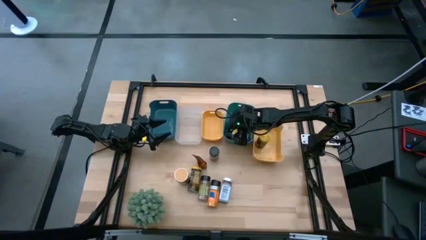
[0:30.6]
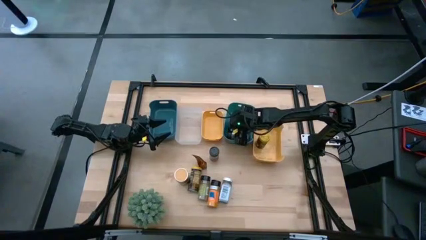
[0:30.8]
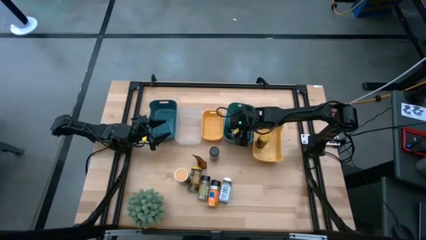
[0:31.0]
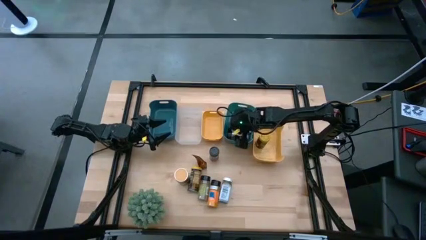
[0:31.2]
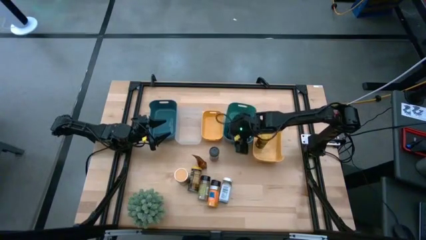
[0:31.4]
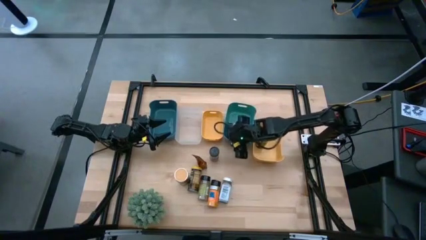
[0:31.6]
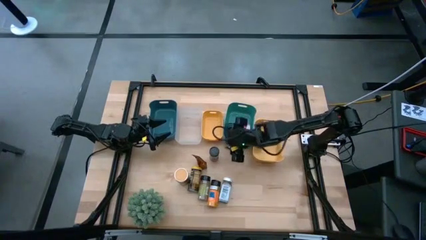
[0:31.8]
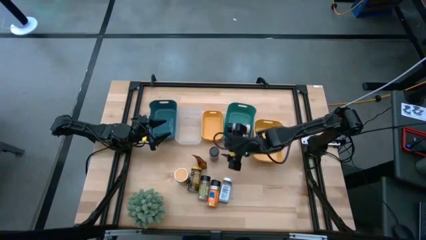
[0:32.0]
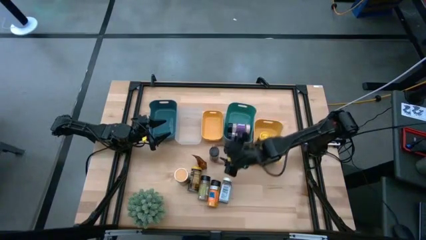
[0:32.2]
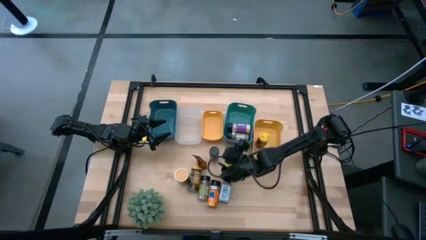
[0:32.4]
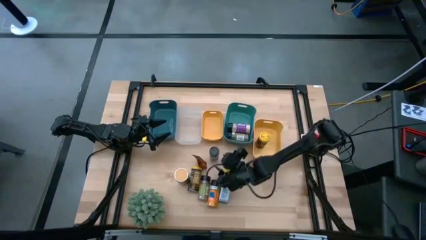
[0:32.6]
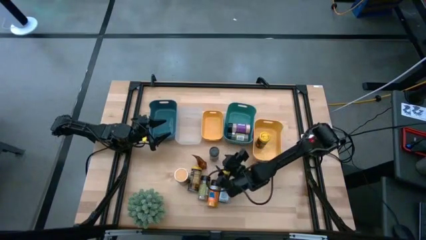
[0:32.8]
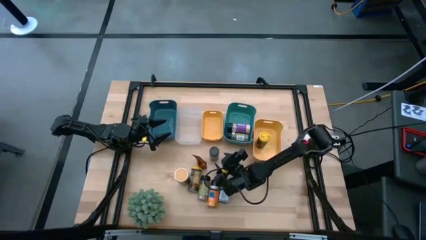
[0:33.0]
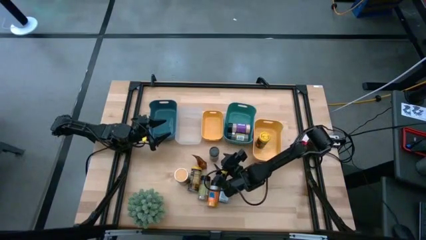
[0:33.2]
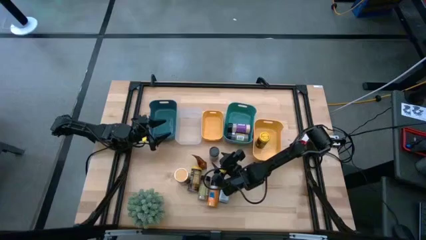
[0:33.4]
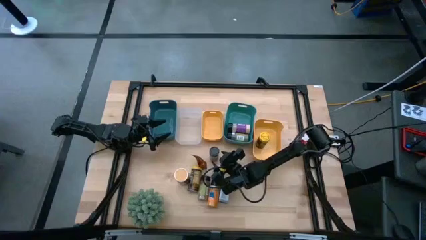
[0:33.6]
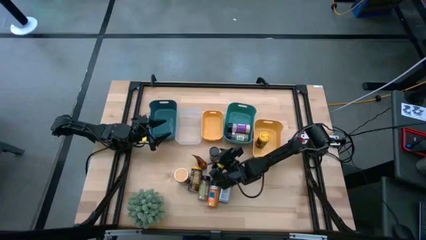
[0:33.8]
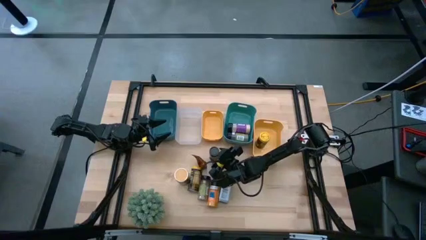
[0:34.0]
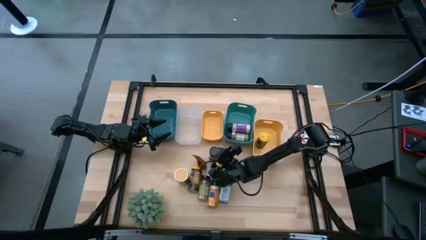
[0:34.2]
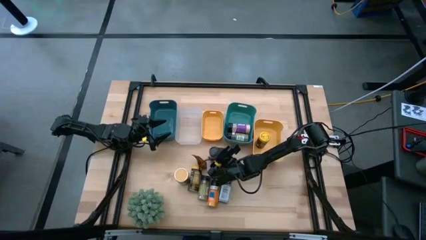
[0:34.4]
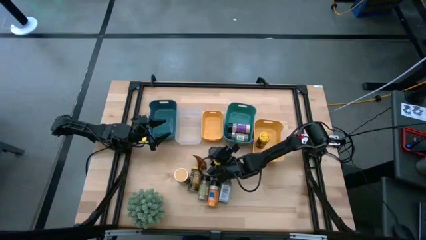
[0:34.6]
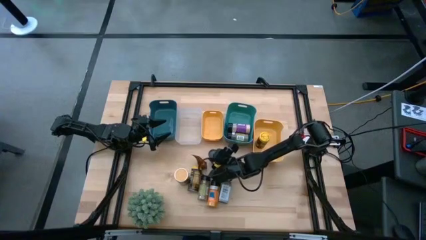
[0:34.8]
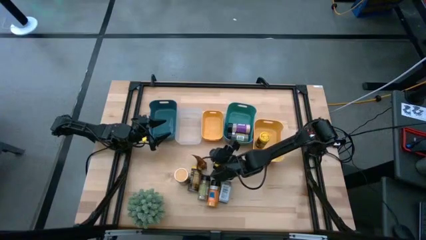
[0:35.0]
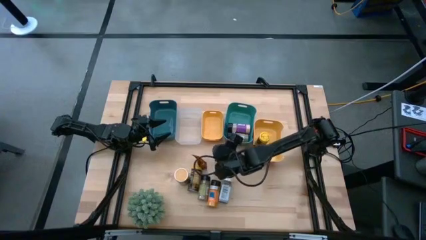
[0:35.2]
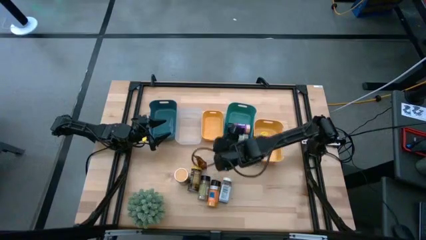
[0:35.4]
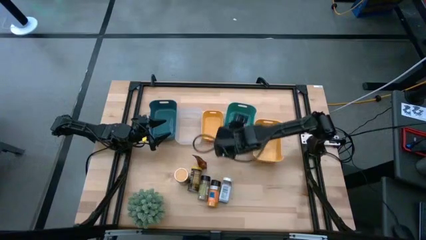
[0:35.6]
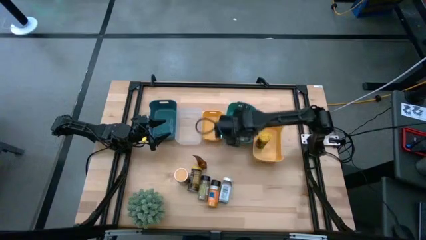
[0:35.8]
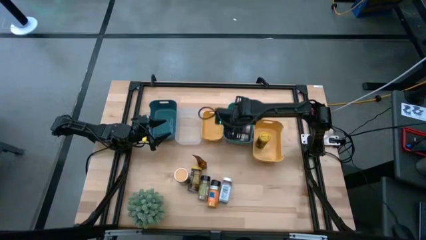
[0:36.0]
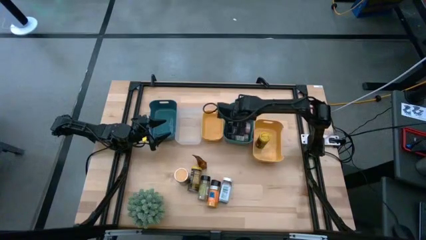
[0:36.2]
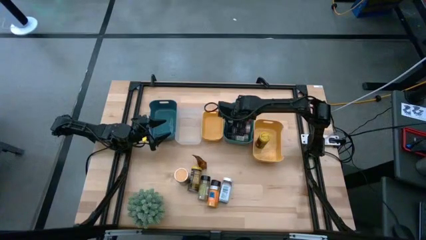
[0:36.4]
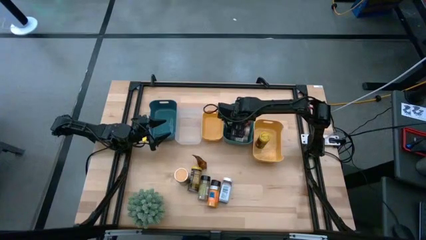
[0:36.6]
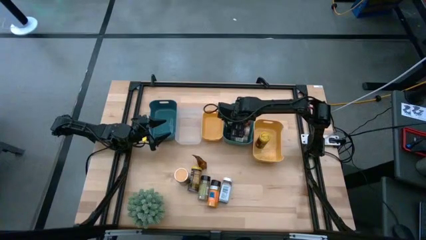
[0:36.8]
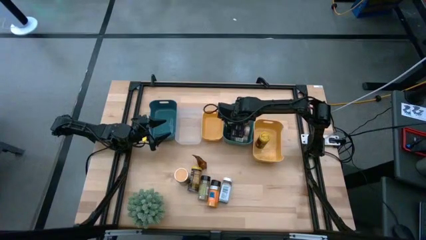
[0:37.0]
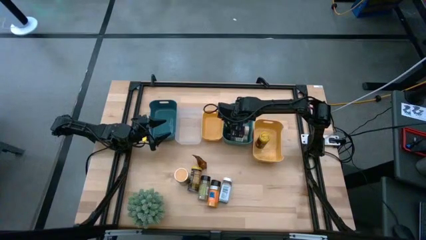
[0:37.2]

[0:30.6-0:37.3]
Task: Sort spices by type
Put the black seasoning bottle into the green bin

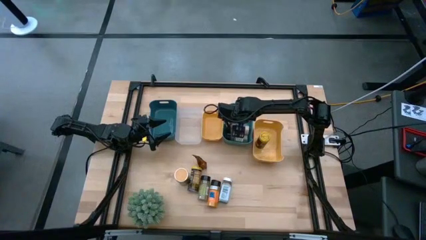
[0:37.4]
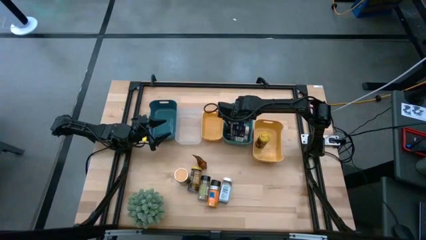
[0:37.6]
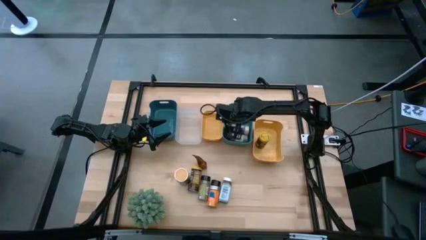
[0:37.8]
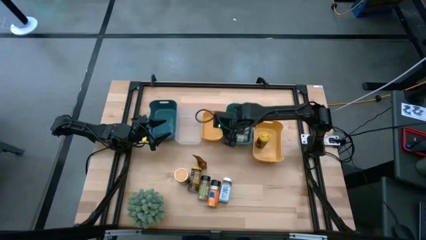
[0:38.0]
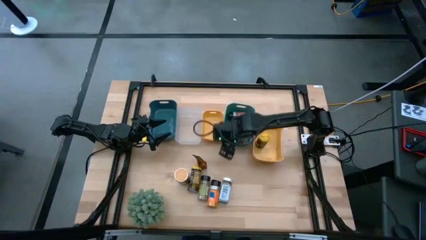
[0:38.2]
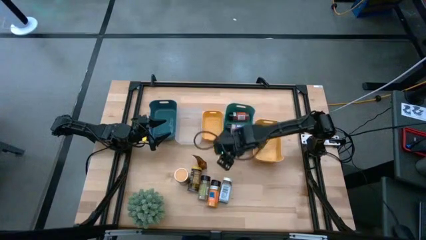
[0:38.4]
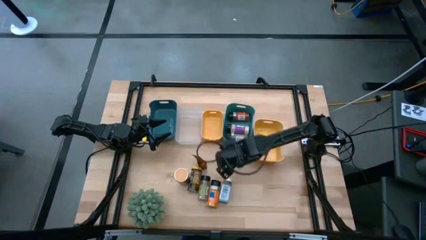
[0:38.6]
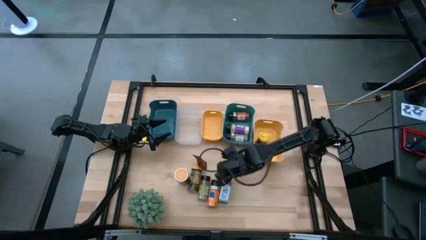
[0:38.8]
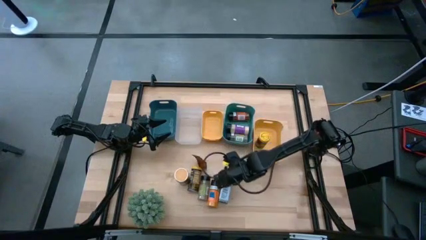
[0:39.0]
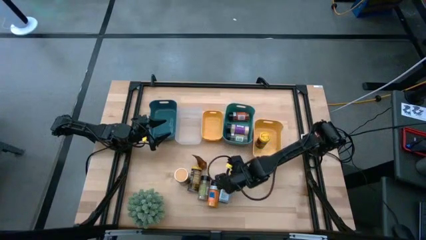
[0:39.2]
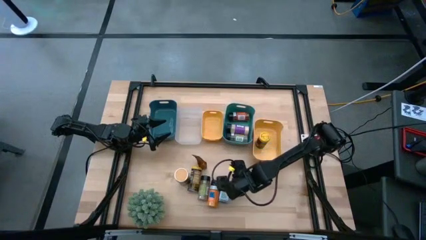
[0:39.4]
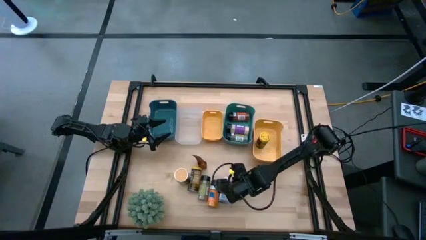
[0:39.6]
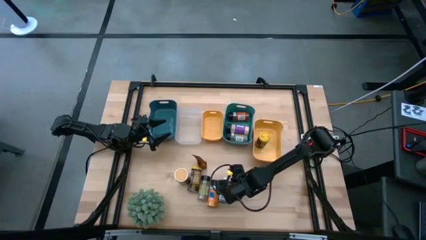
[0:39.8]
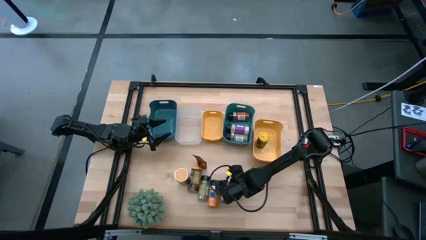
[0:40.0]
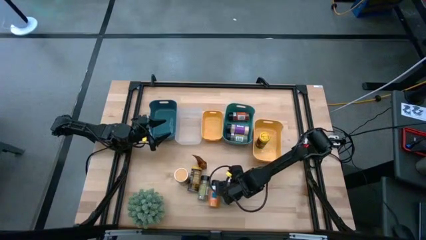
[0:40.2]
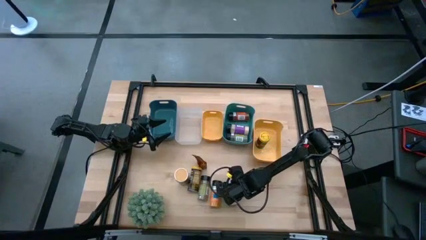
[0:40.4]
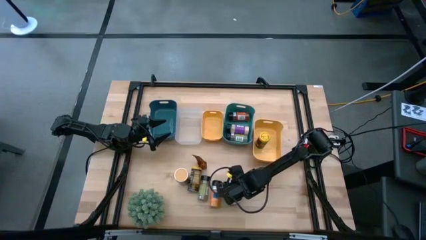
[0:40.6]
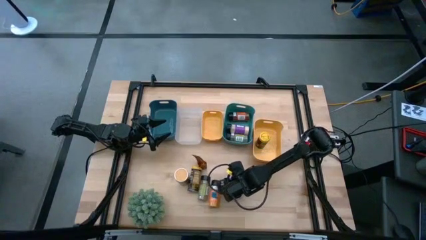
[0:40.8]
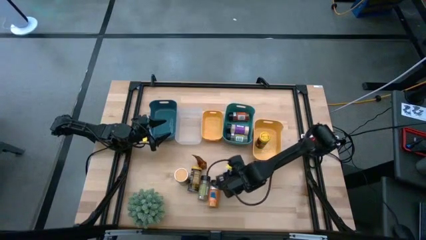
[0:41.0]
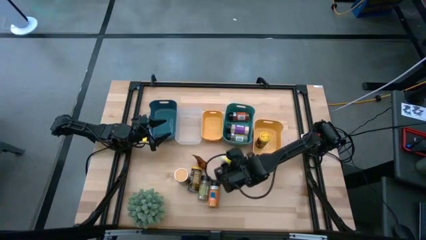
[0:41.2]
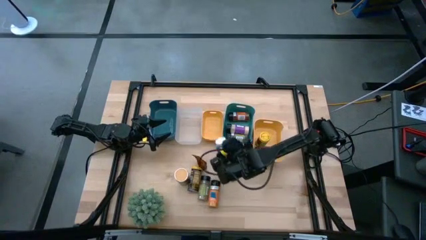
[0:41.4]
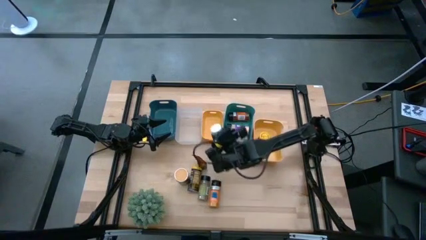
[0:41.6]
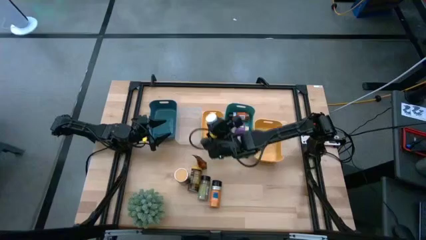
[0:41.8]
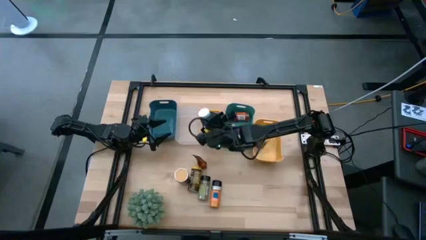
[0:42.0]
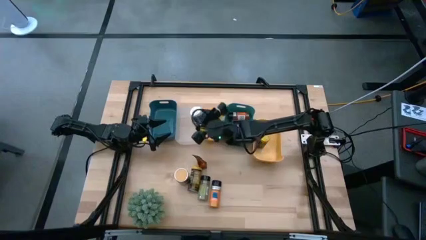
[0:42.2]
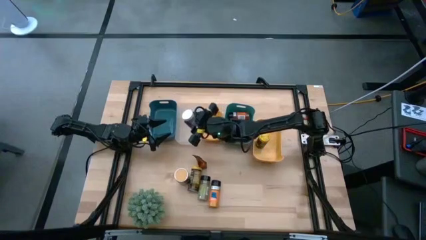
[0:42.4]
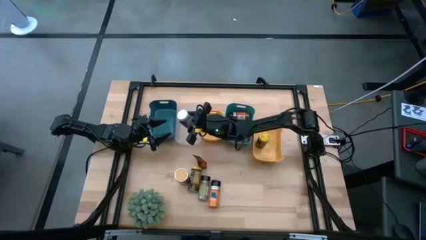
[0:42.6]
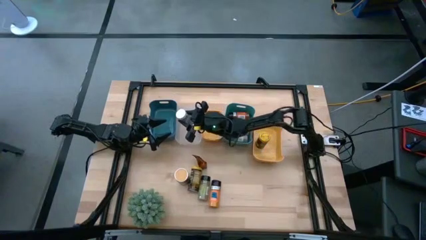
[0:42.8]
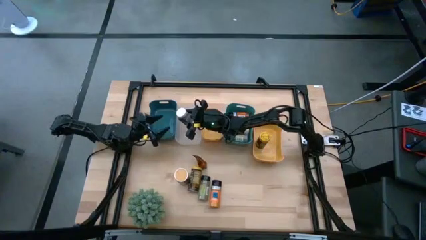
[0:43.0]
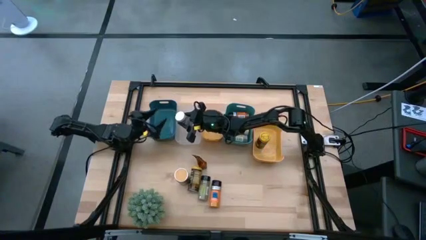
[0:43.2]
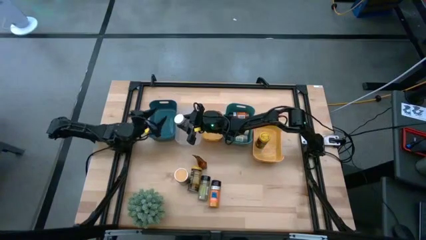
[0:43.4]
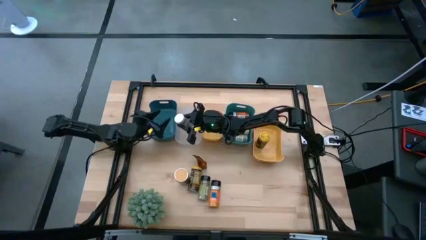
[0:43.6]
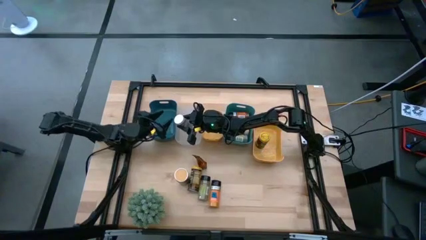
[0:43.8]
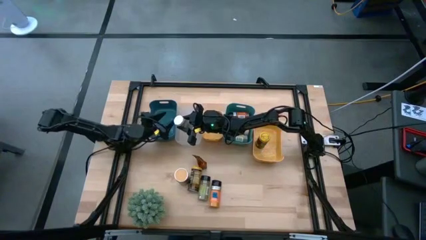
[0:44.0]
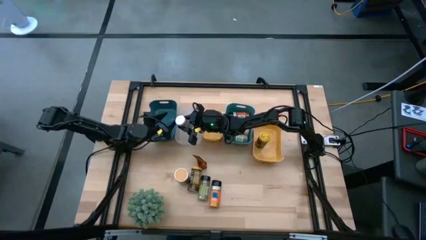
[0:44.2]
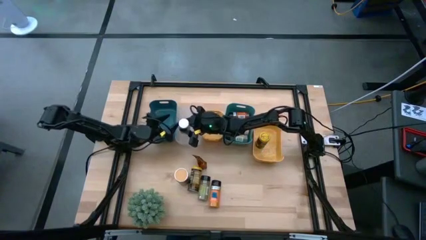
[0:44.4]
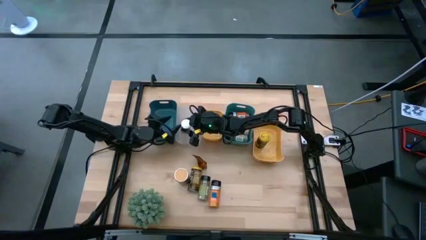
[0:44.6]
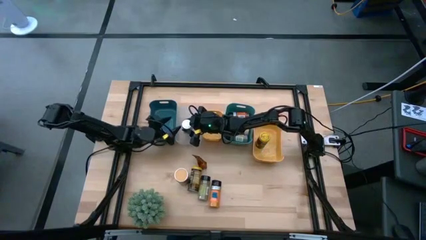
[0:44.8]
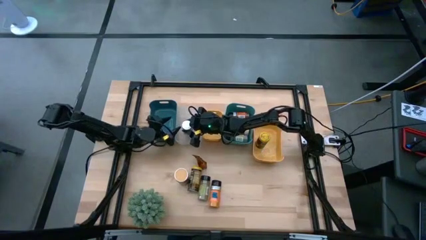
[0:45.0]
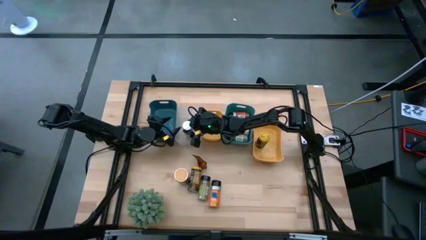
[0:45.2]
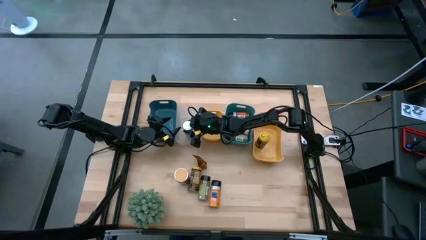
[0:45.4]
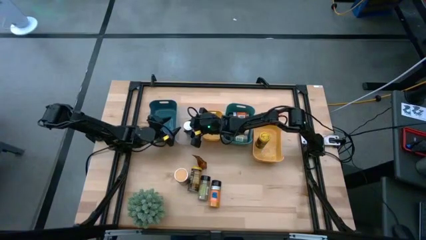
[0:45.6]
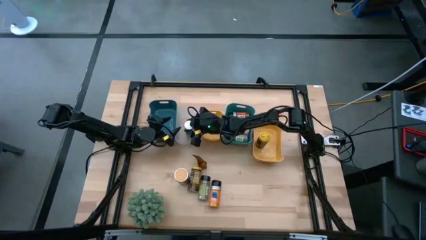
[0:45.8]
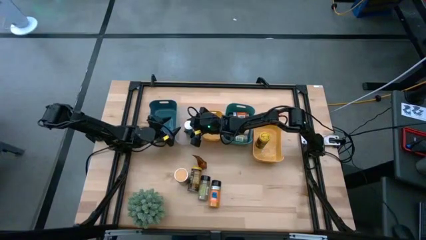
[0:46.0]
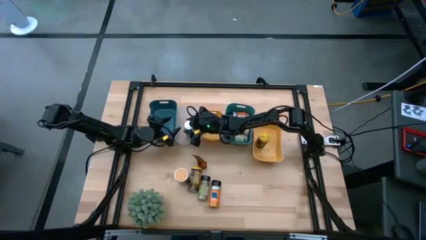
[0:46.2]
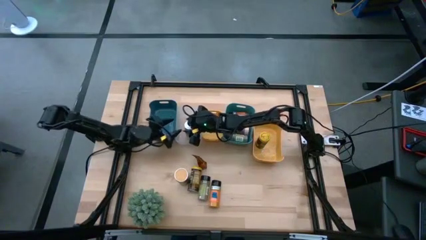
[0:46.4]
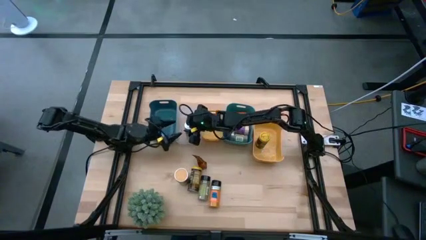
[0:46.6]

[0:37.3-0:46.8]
Put the white seasoning bottle into the transparent bin
